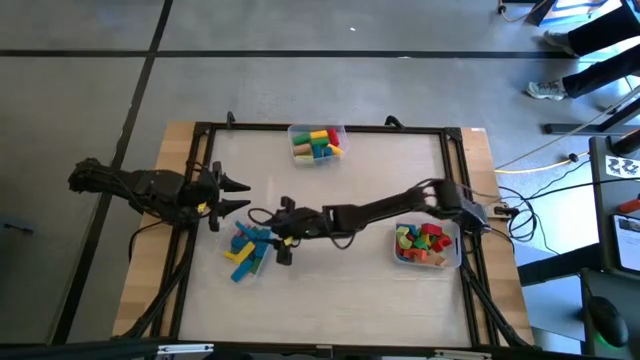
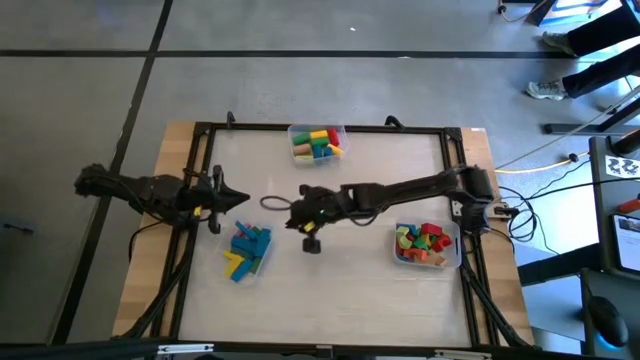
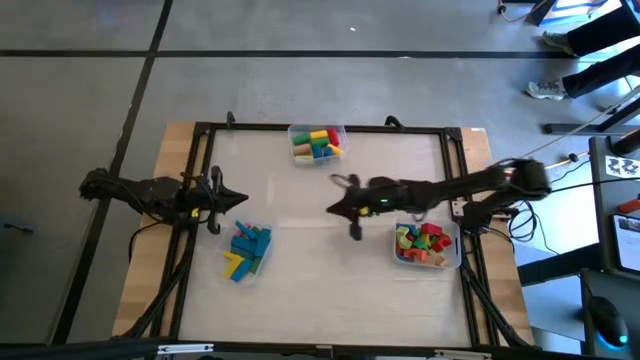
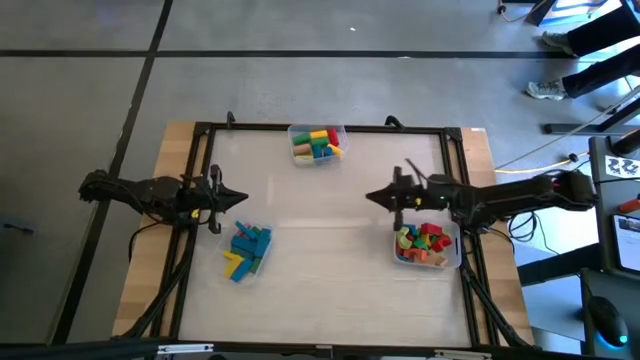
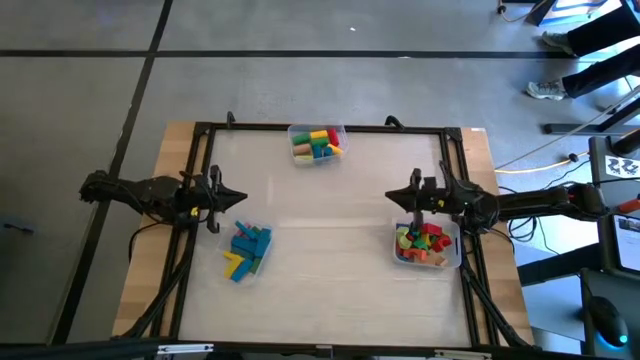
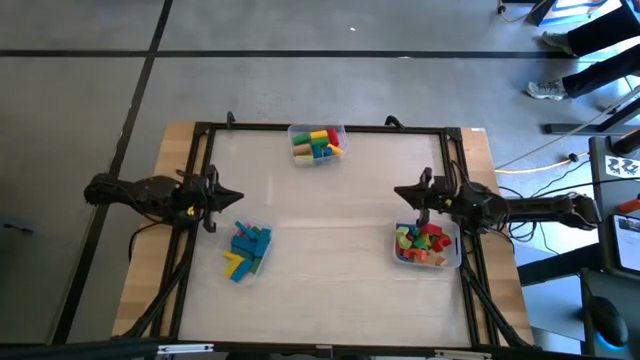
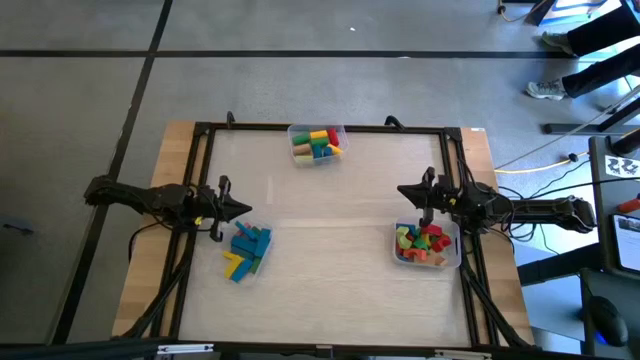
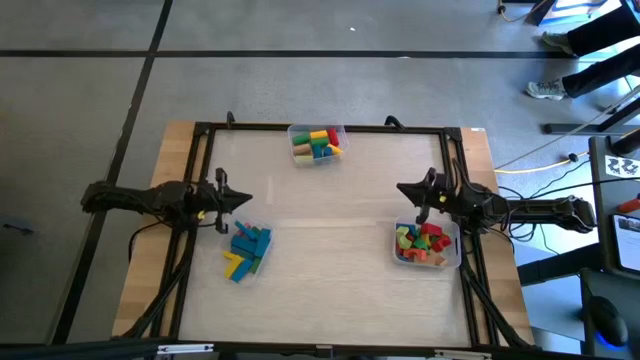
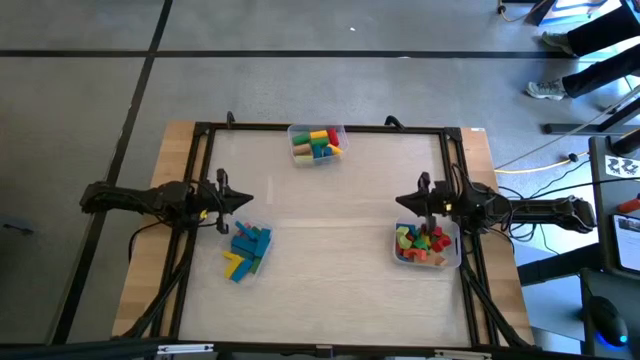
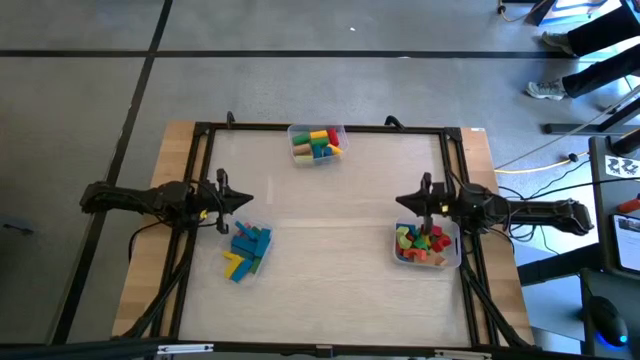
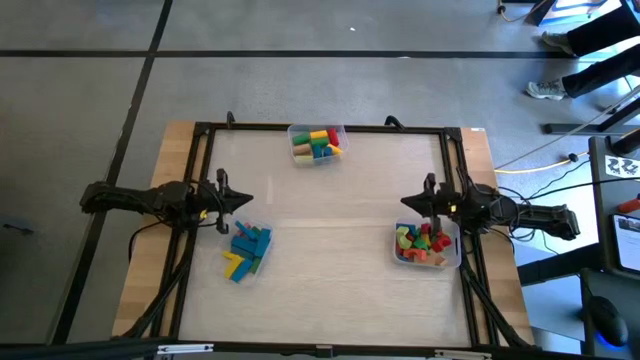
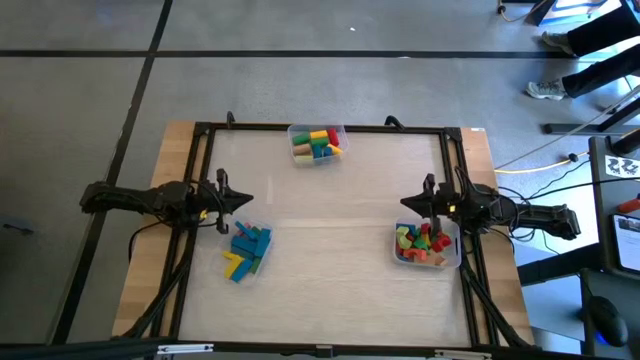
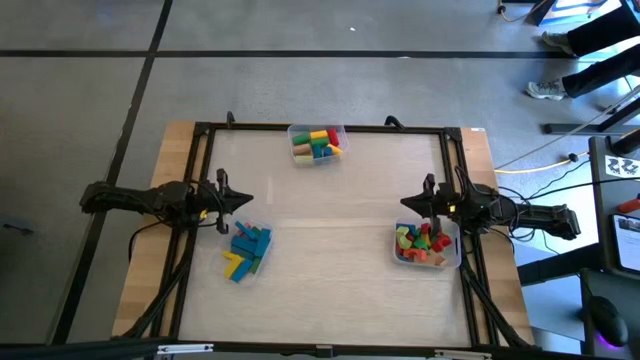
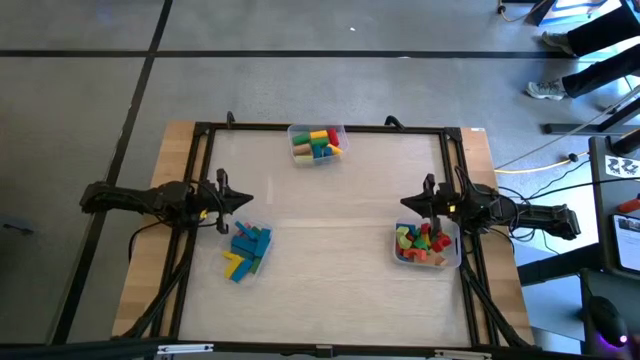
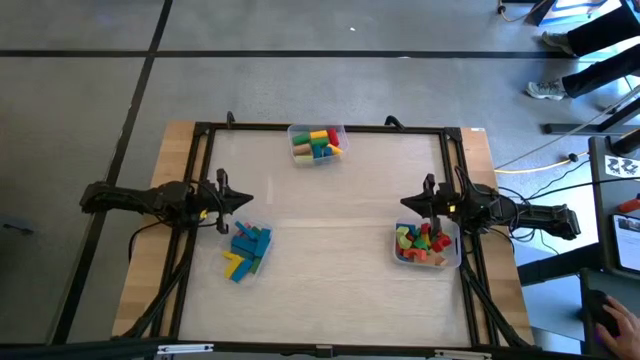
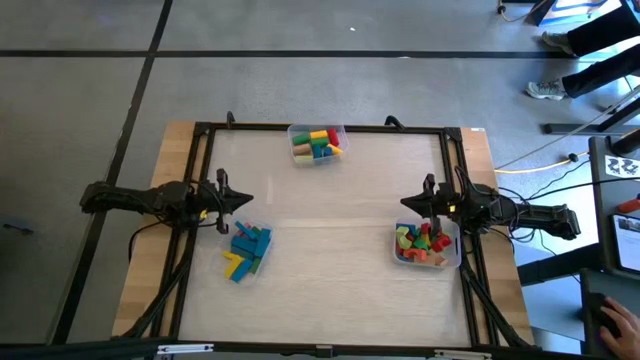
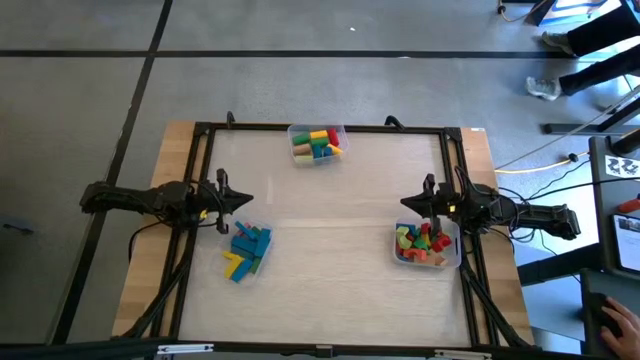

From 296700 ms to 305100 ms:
Task: Sort blocks by size
Return to Home Position

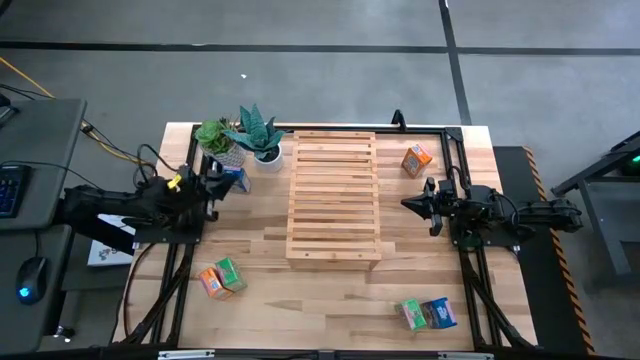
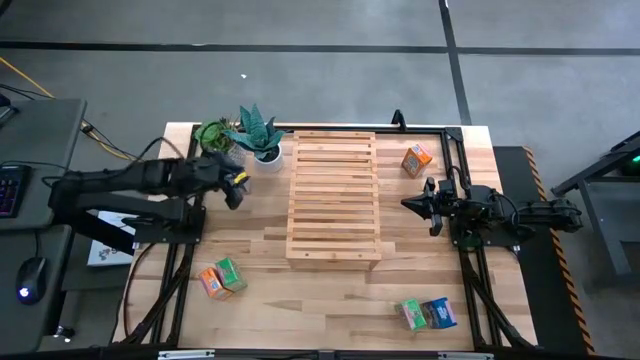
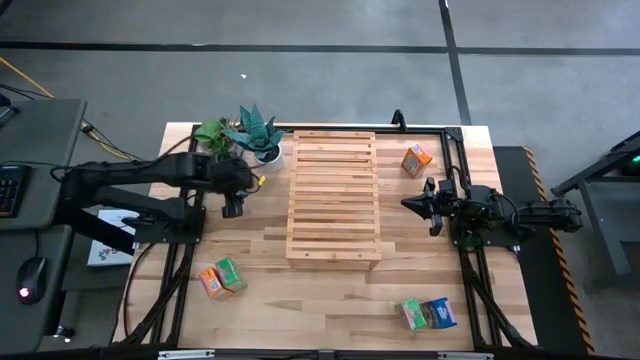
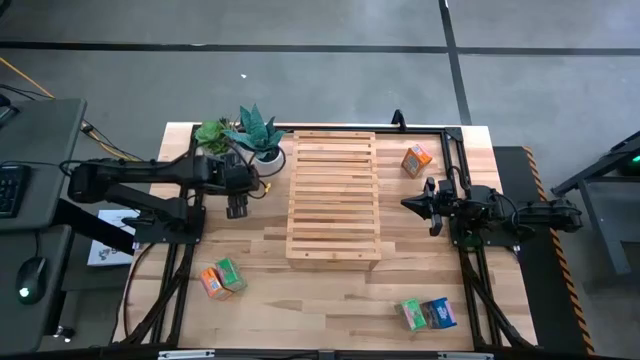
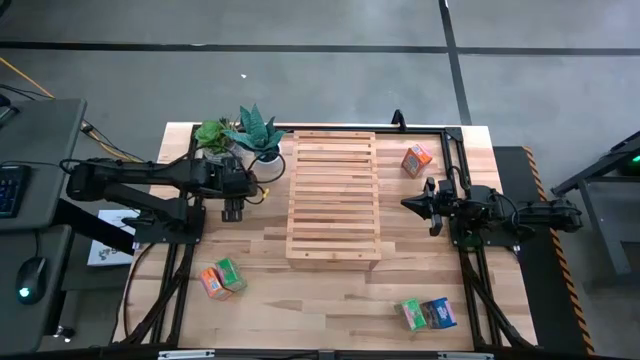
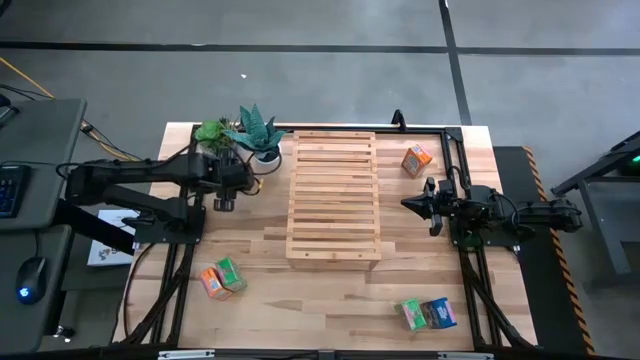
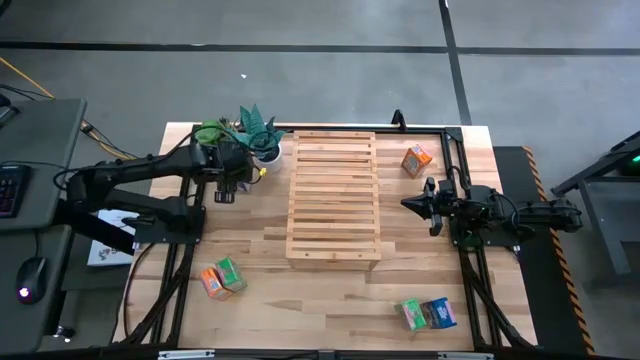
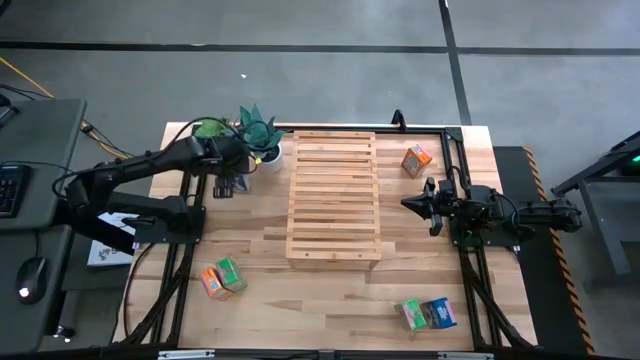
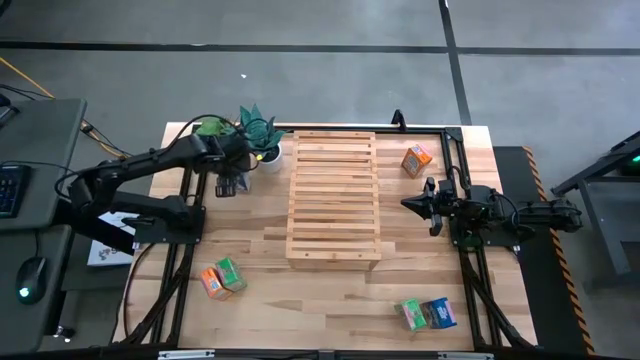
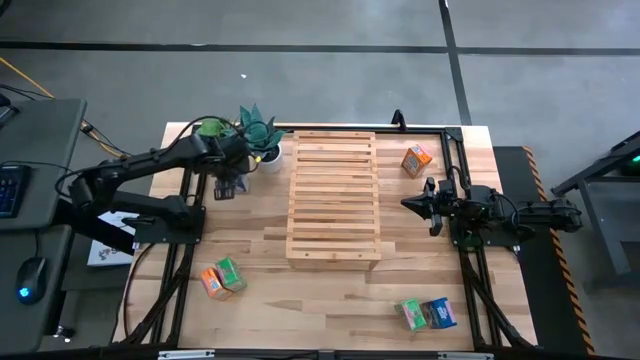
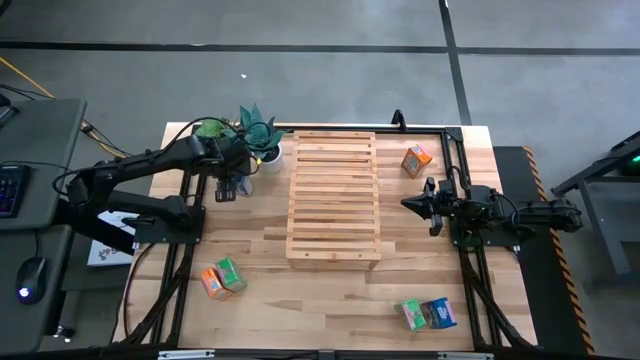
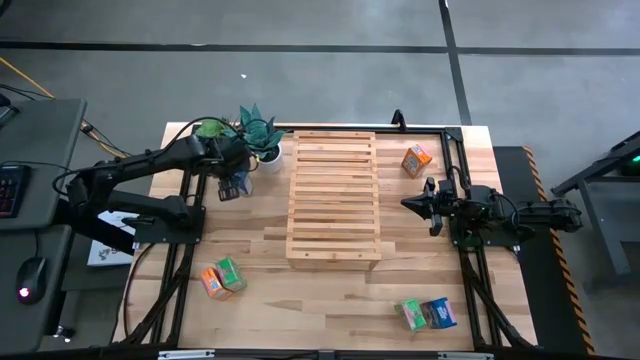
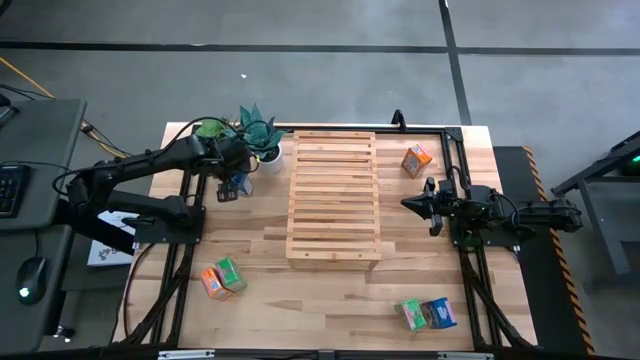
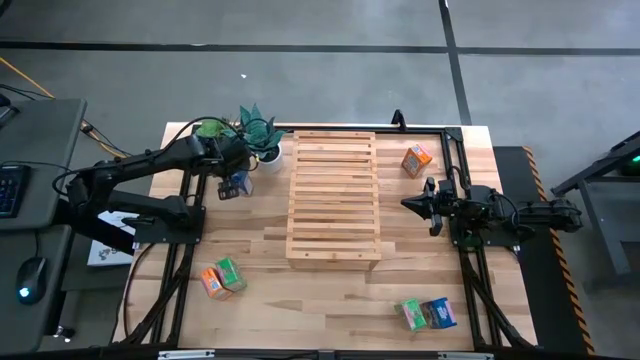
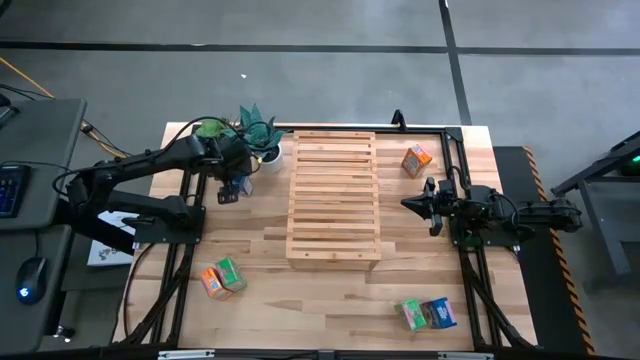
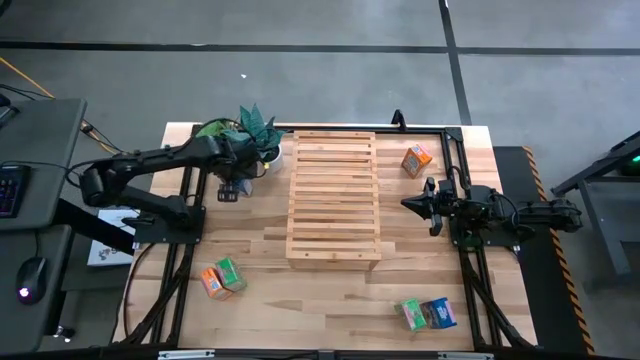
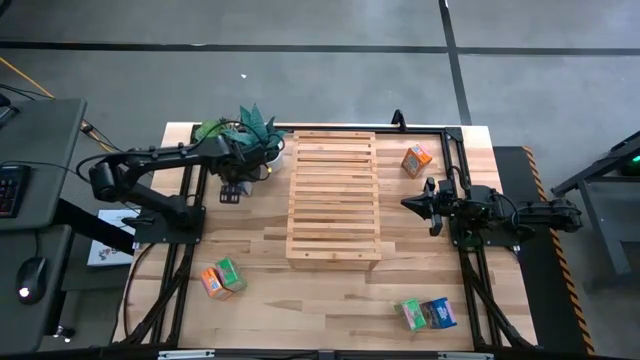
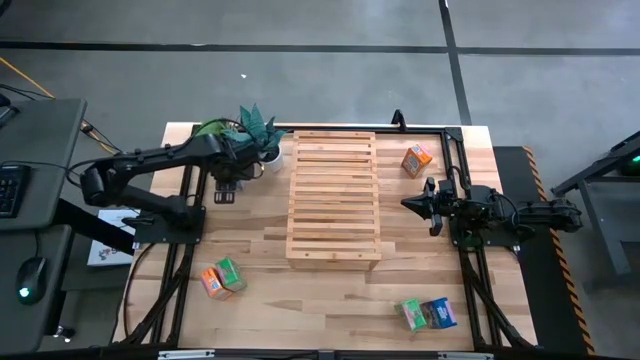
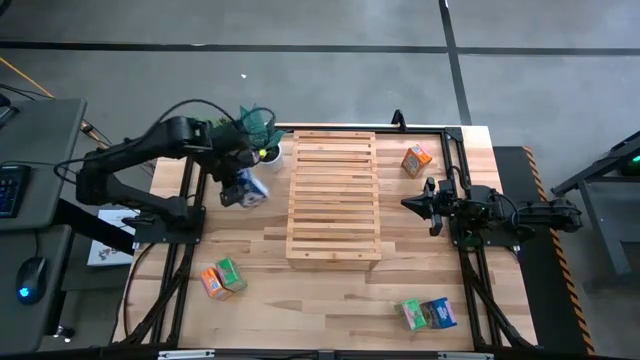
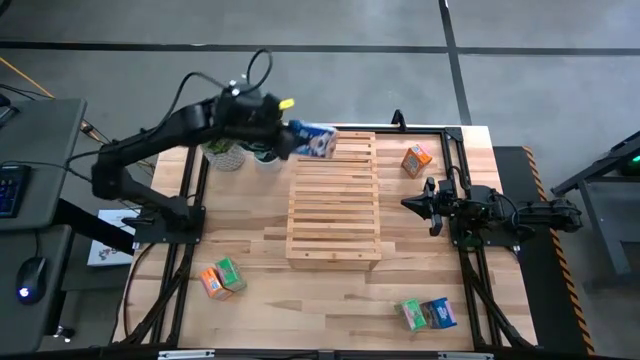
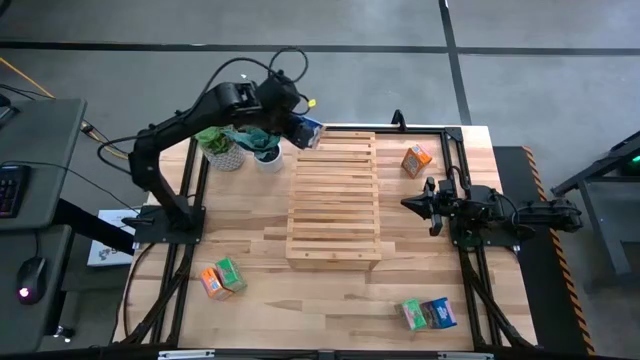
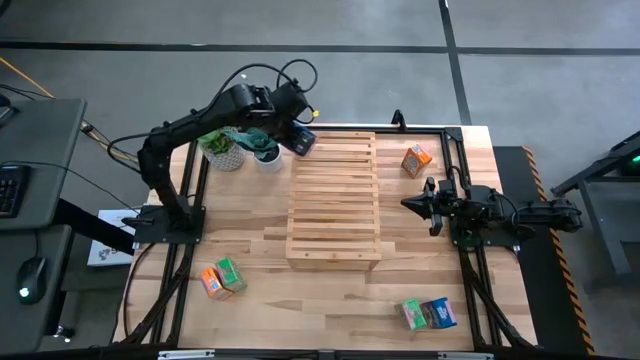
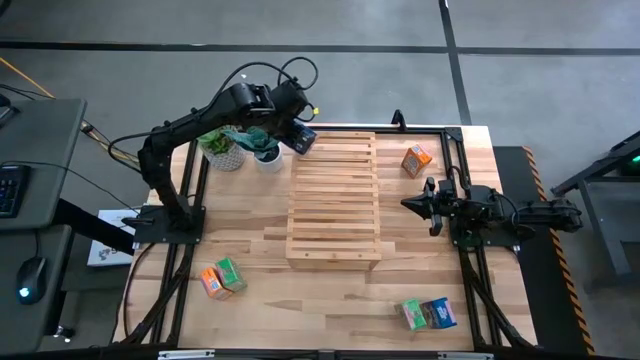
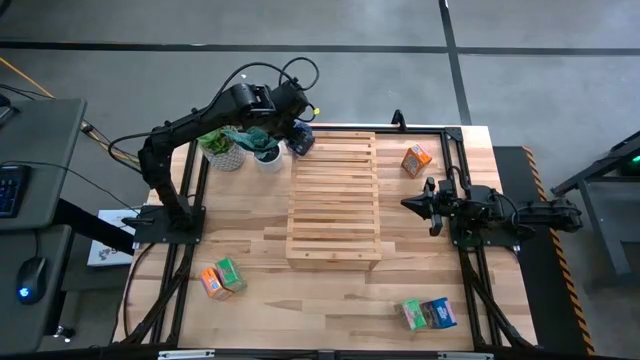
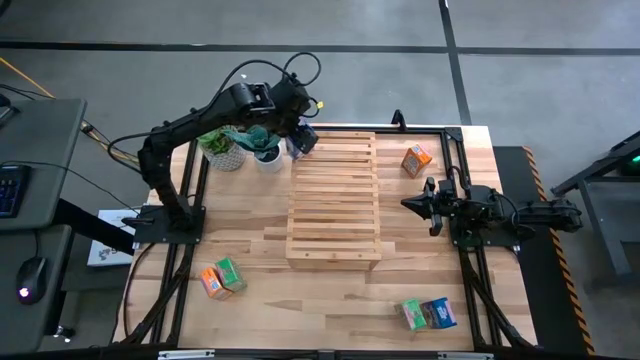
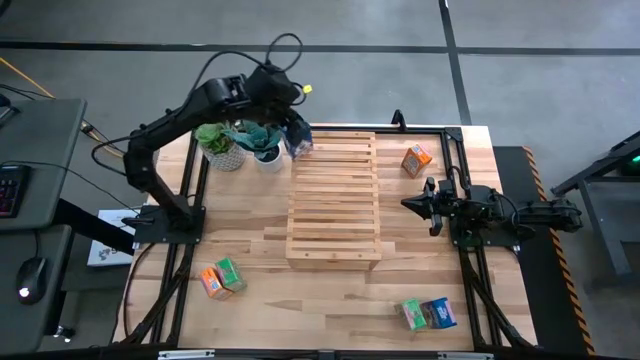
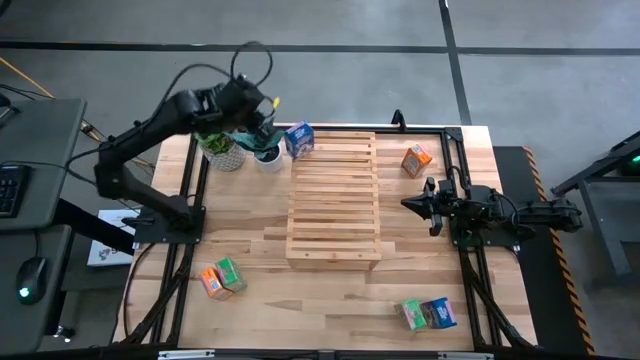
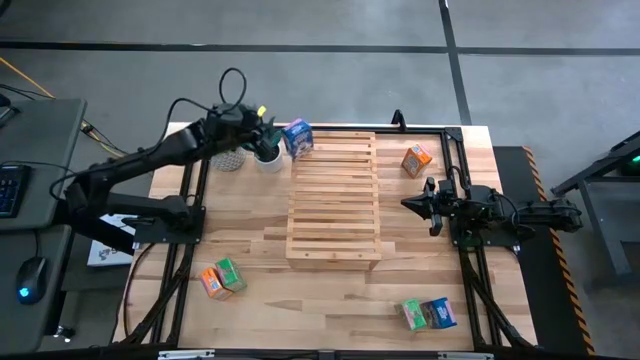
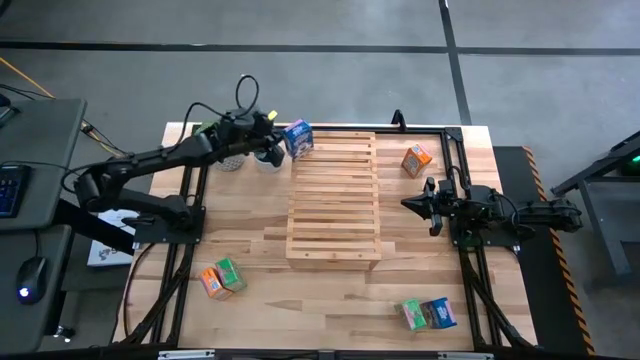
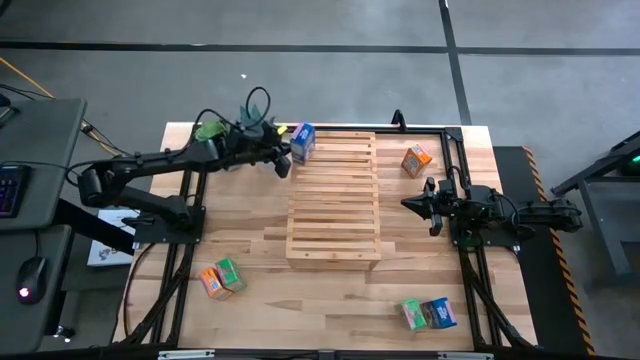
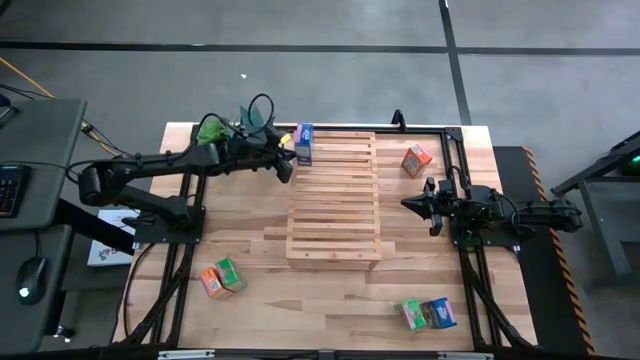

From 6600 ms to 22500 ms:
Task: Stack cereal on shelf
Put the left blue cereal box on the shelf
